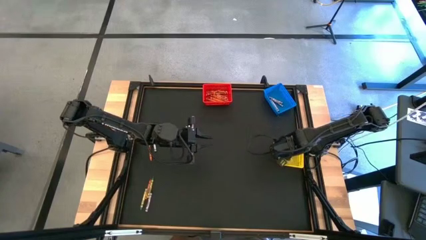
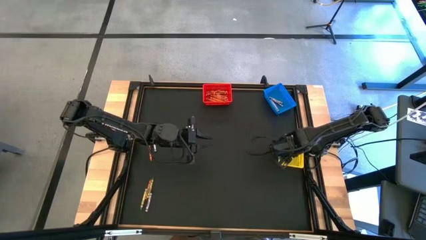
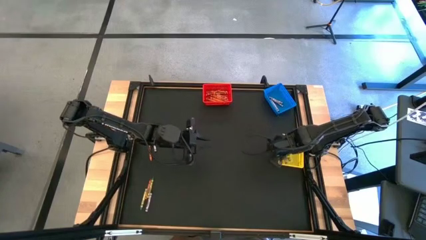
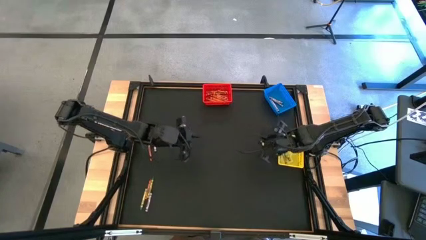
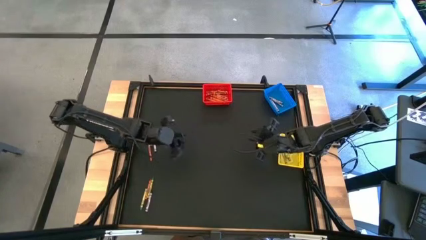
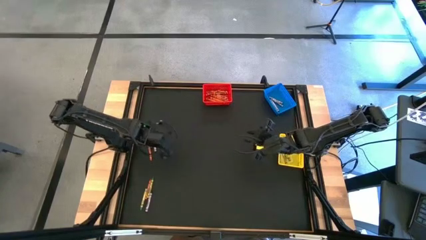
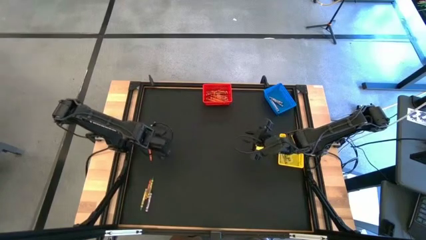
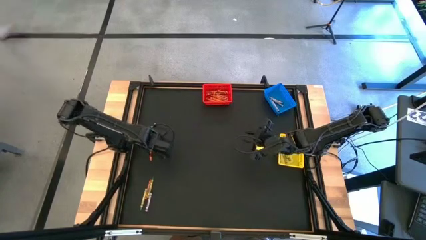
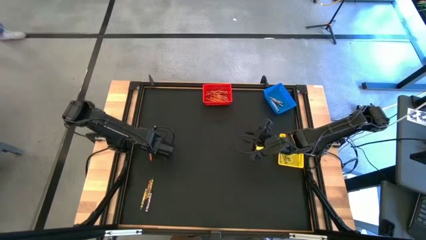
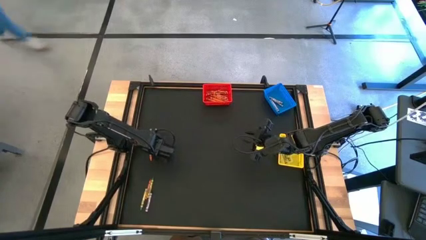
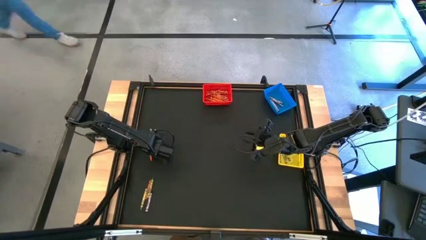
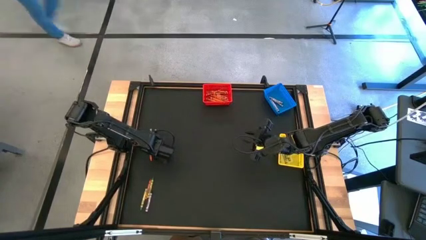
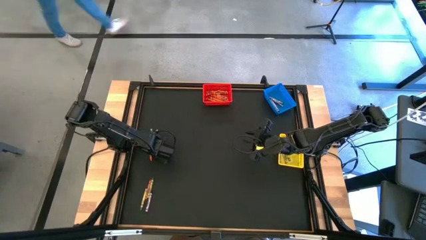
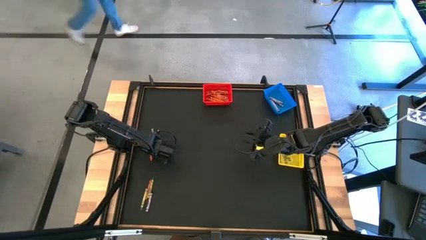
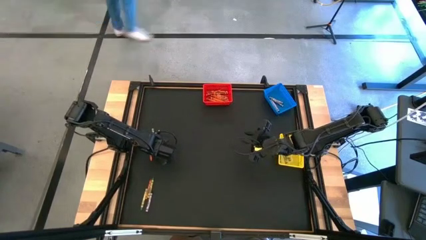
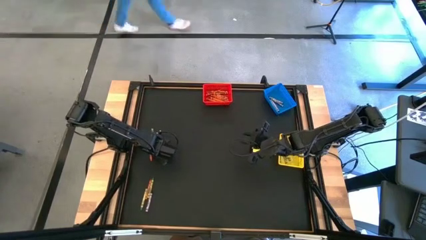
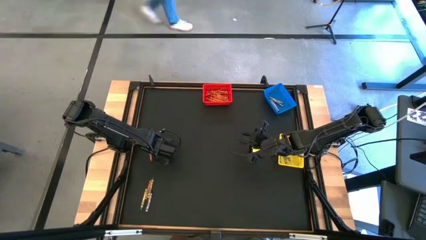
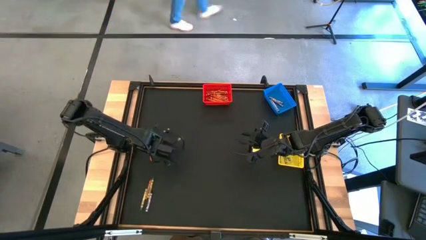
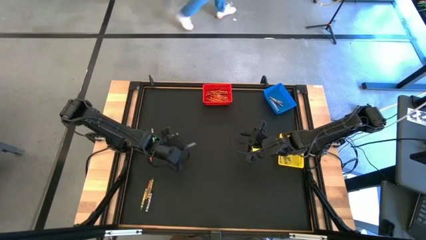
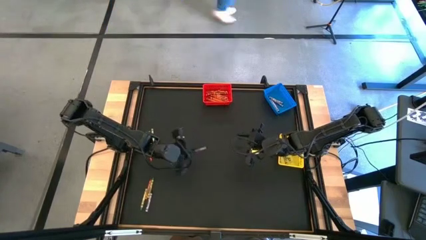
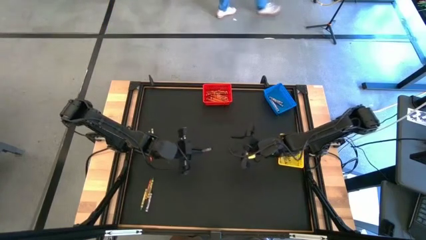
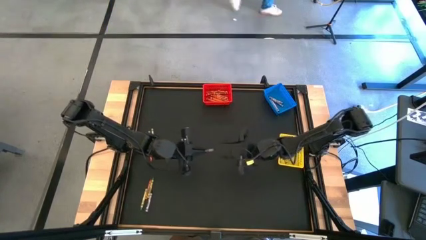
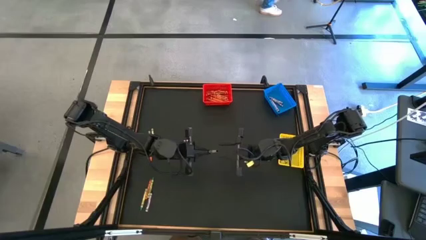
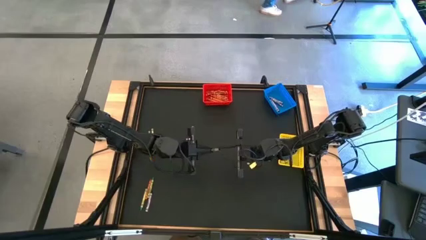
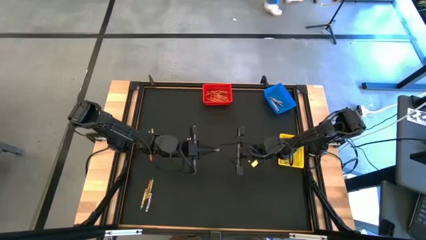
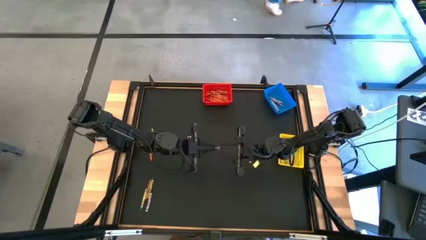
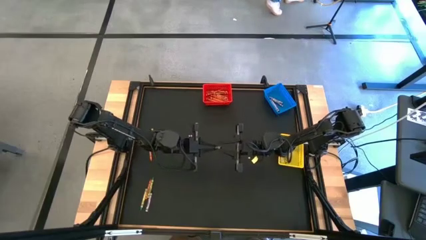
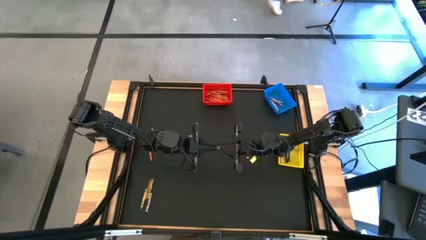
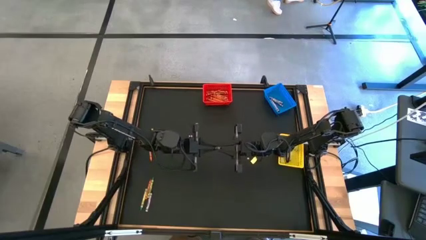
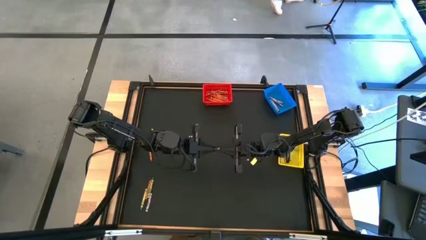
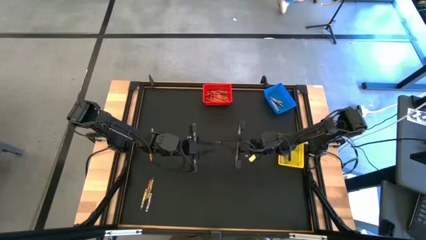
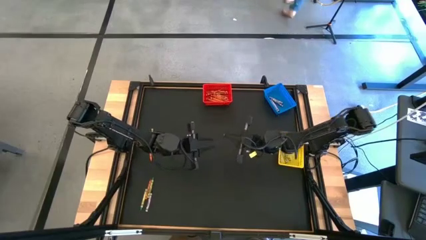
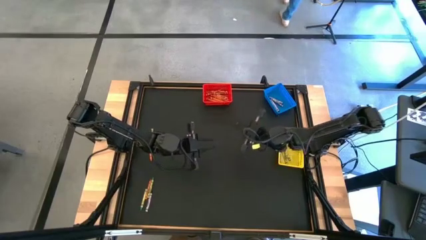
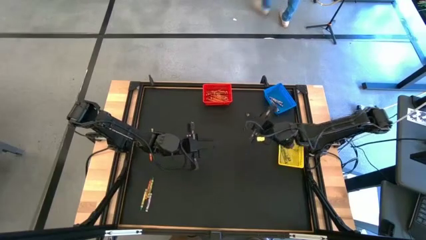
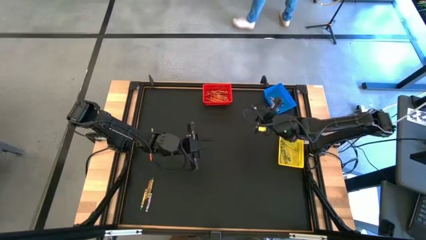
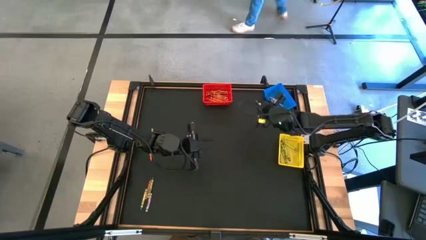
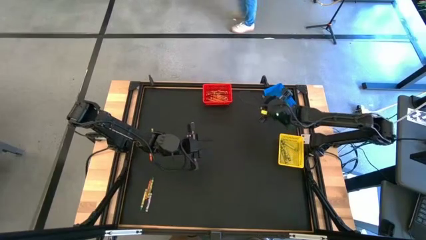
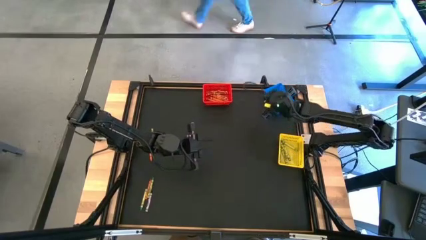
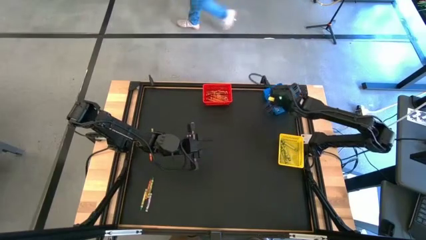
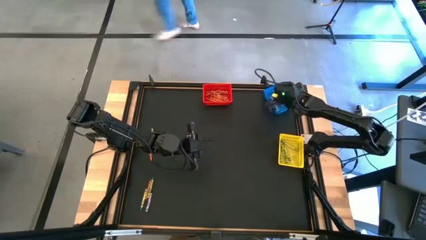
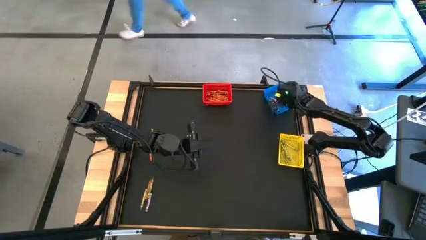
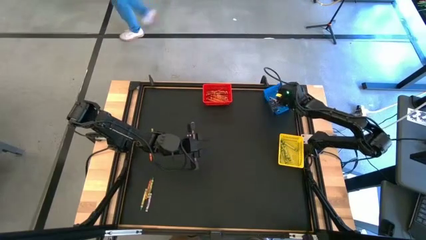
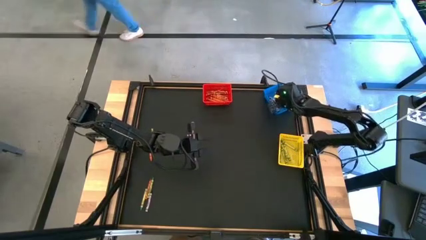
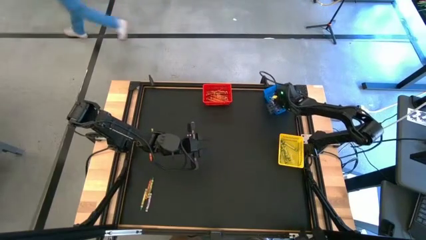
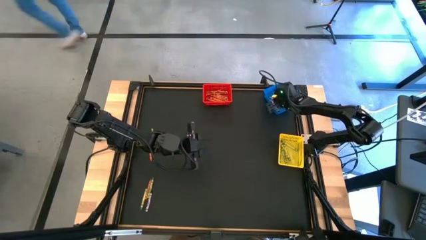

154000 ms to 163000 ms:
Task: Sort crayons
Put the black crayon into the blue bin

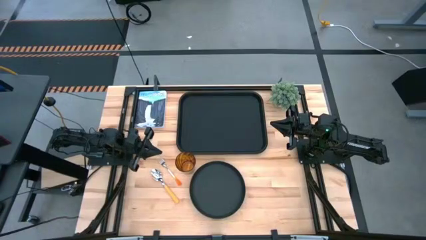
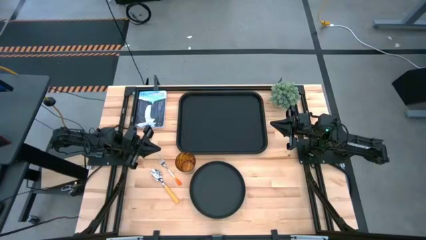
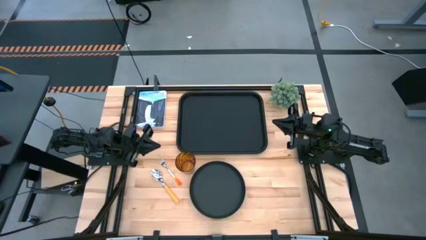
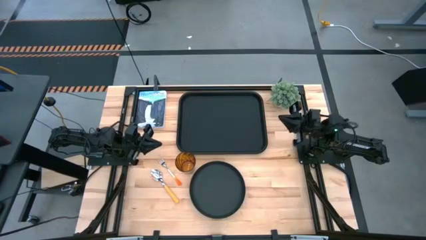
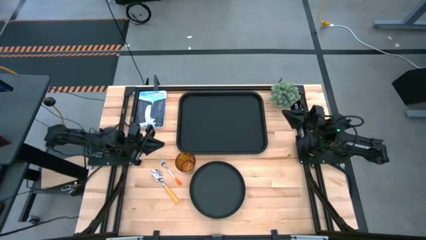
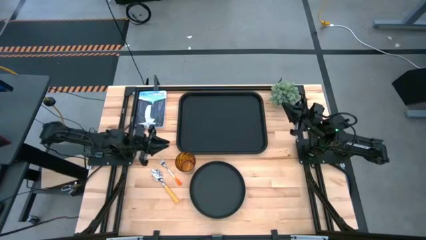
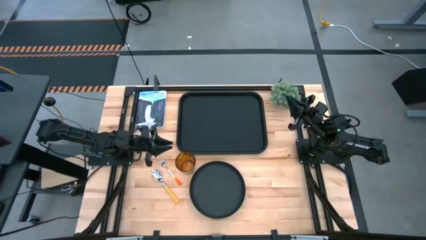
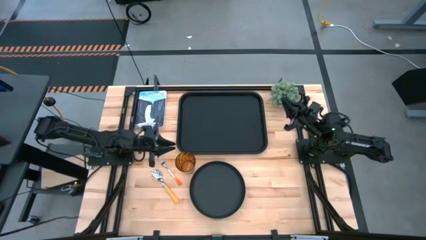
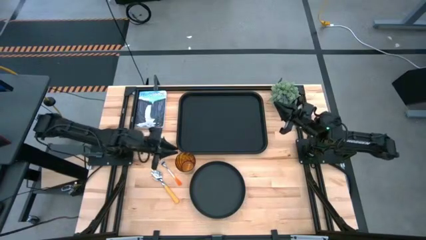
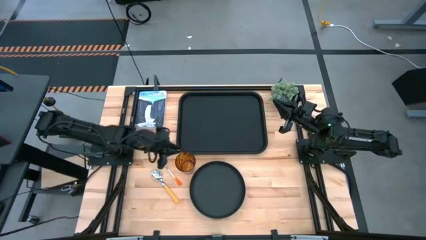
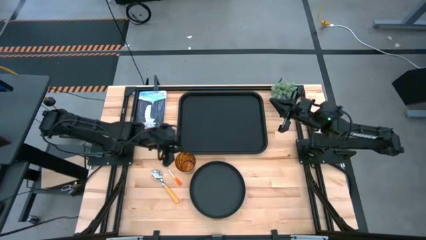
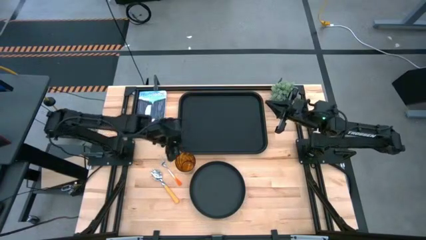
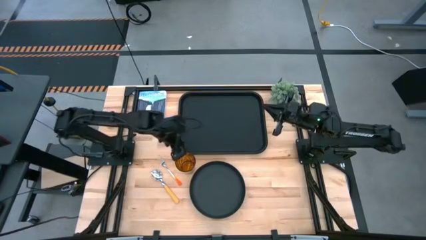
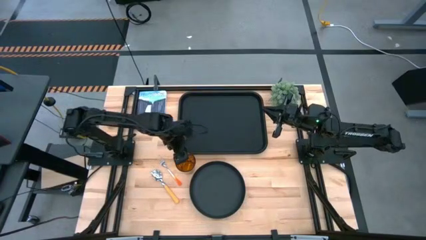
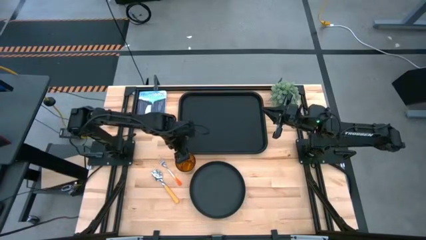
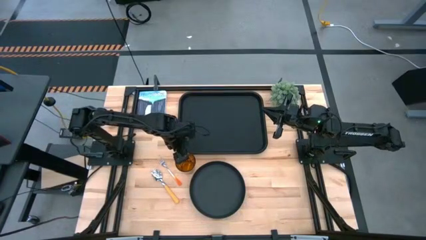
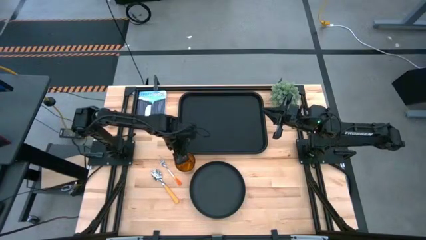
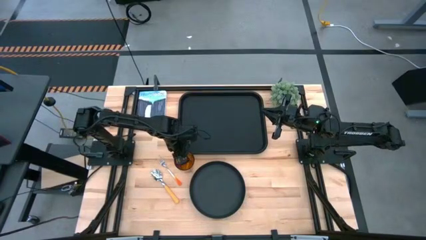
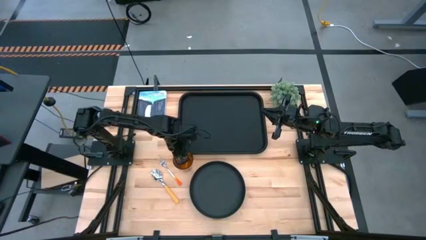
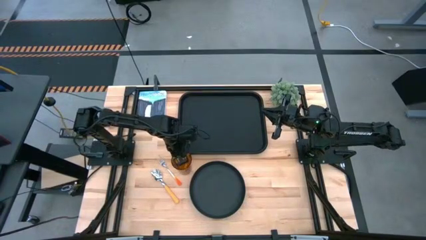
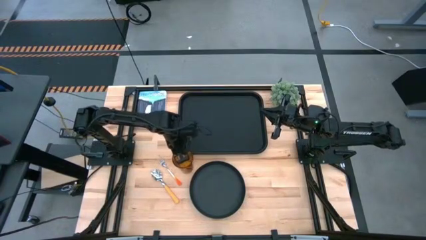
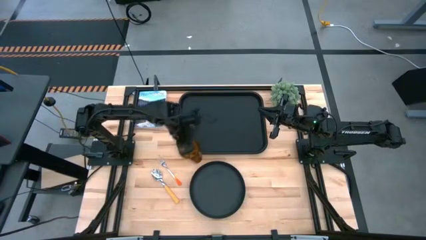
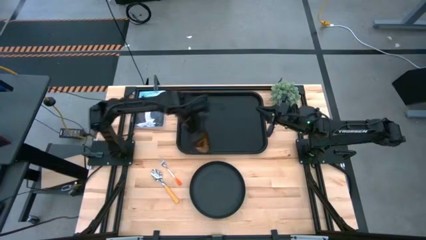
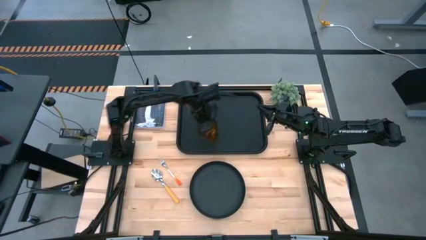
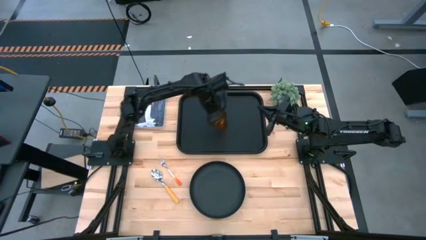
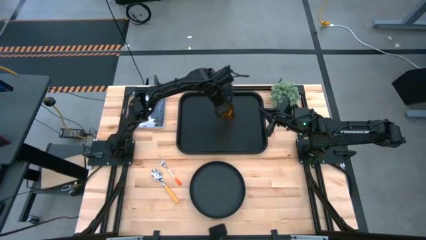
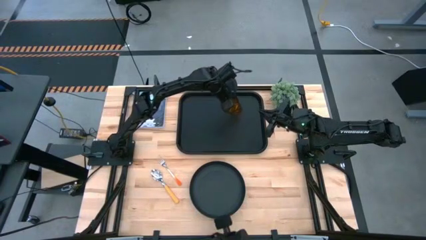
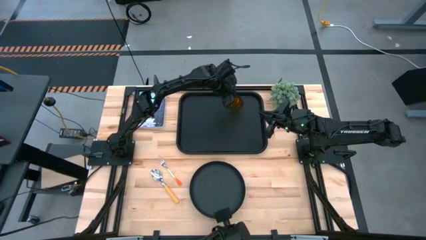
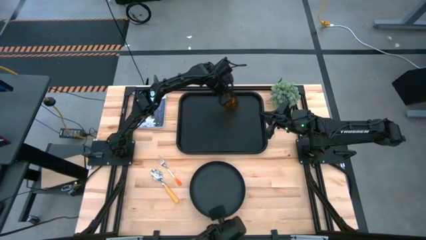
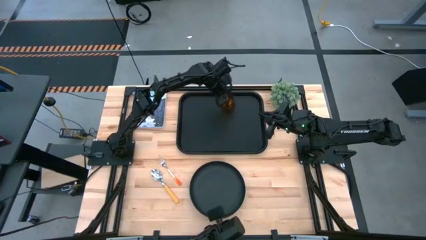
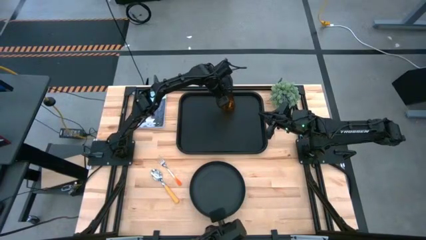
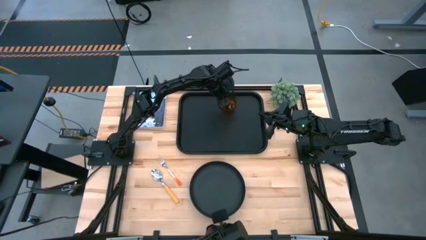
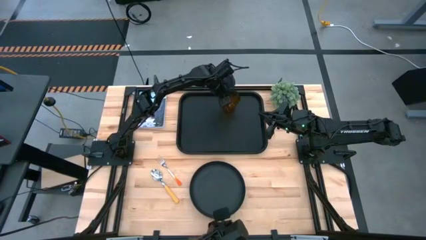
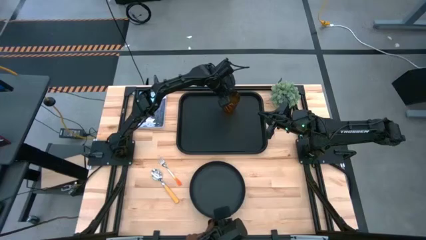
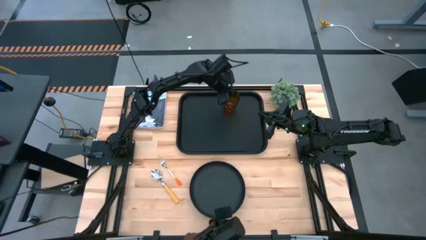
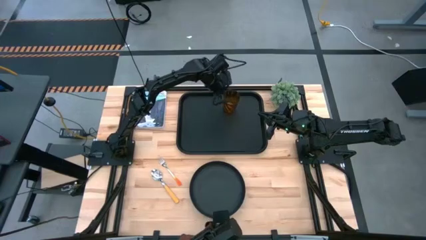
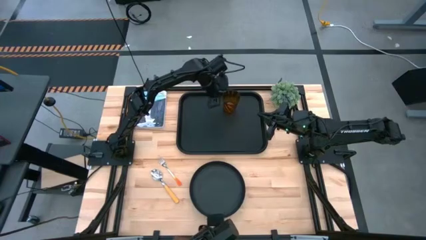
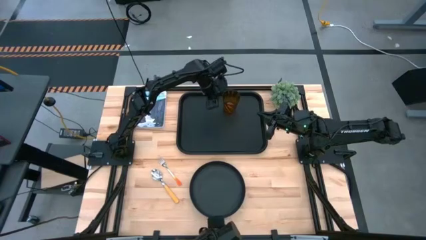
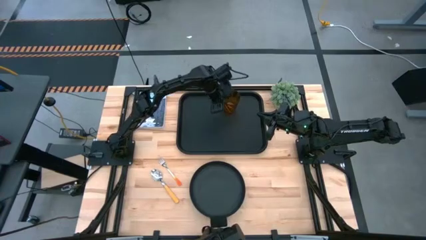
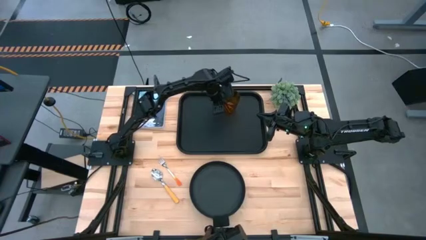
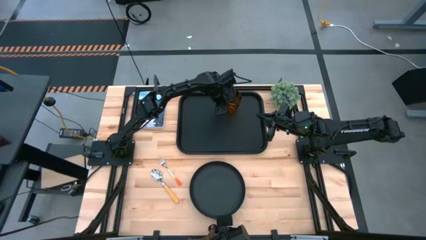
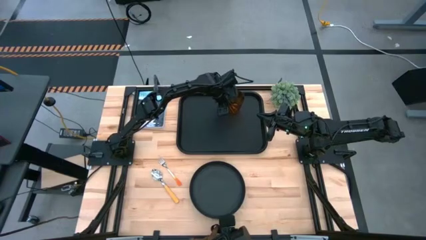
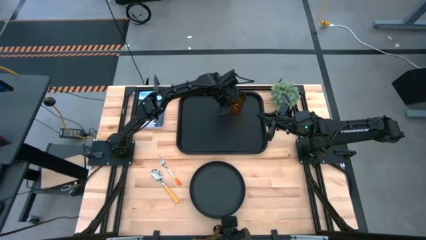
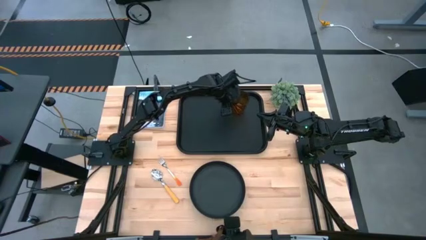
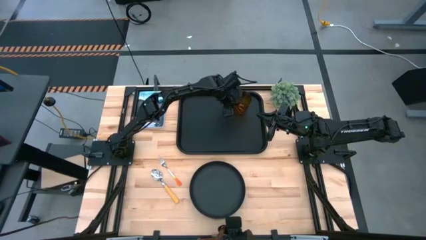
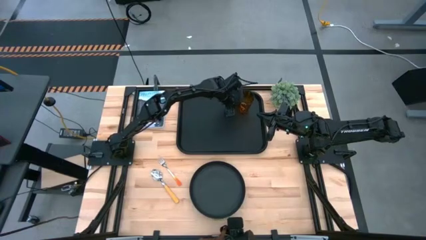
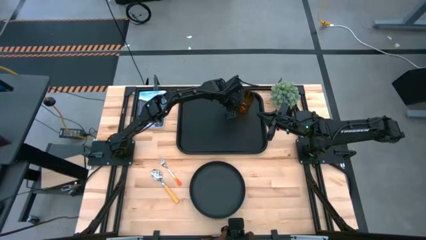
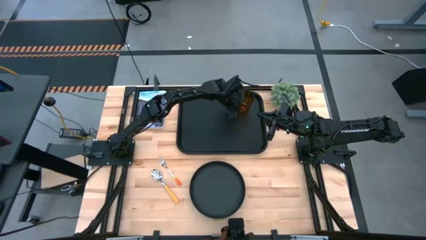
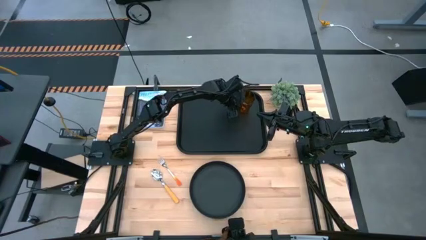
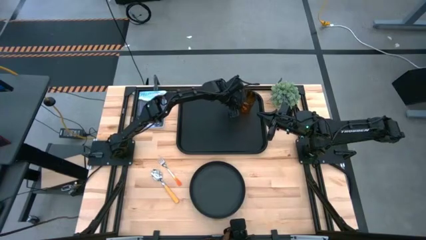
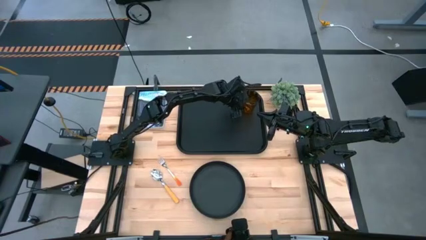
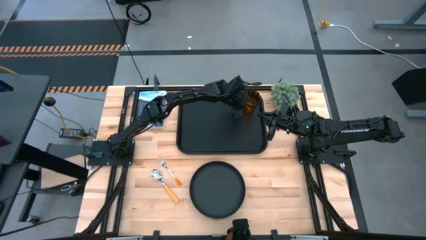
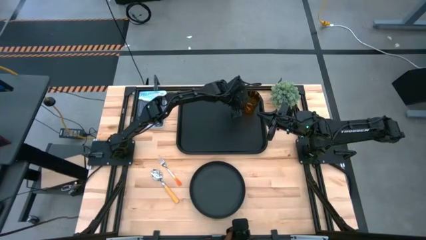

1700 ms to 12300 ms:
Task: Pick and place plate/cup/fork/spoon on tray
Put the brown cup on the top right of the black serving tray
